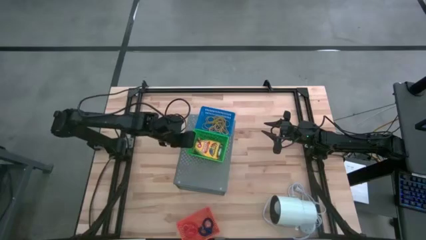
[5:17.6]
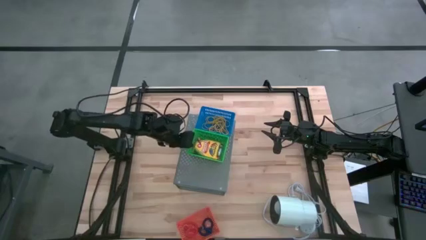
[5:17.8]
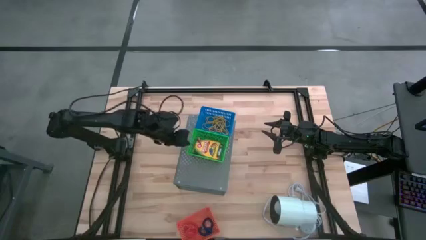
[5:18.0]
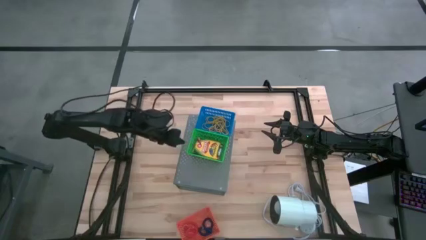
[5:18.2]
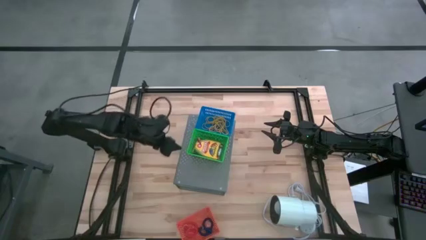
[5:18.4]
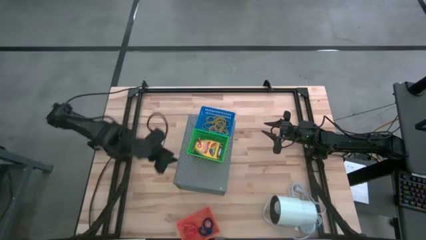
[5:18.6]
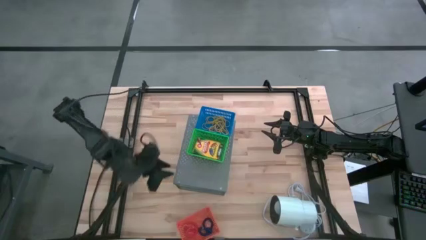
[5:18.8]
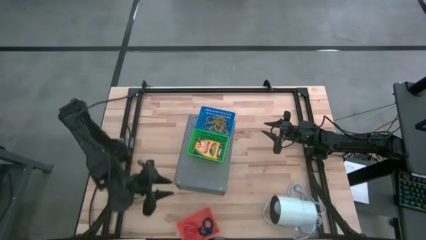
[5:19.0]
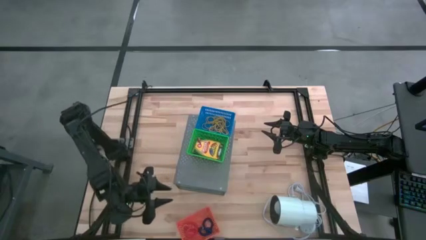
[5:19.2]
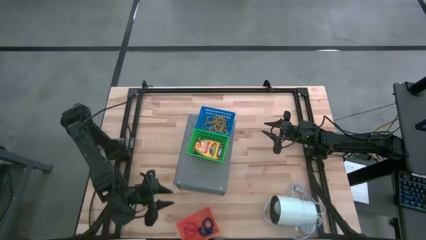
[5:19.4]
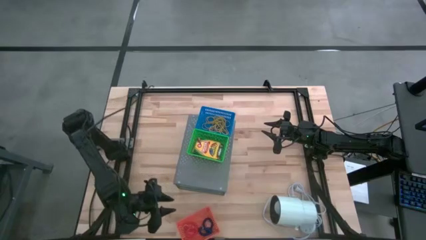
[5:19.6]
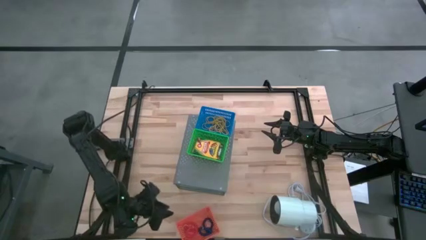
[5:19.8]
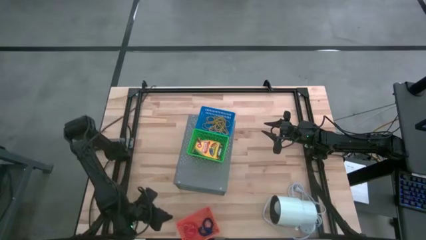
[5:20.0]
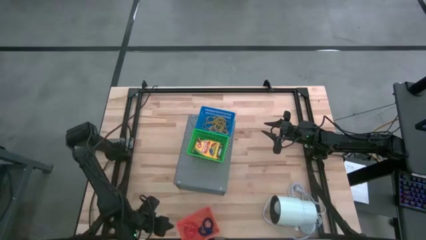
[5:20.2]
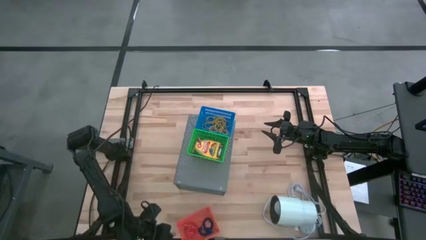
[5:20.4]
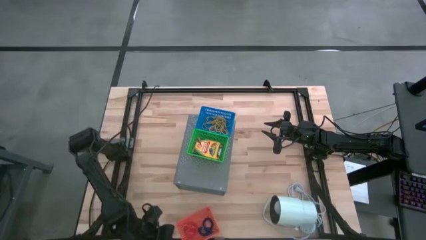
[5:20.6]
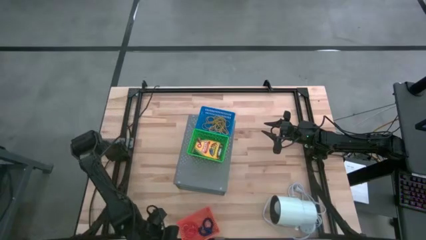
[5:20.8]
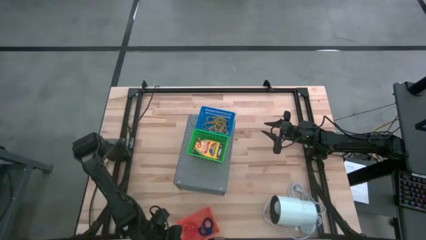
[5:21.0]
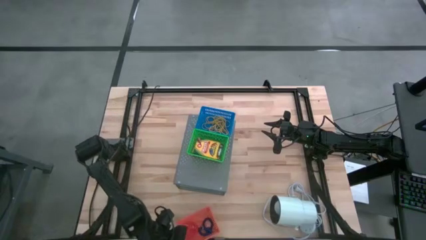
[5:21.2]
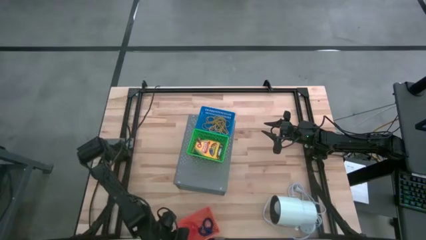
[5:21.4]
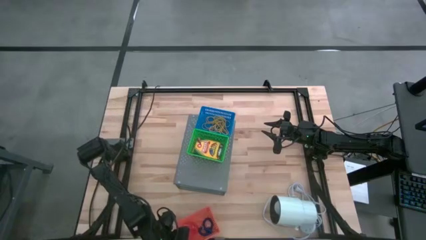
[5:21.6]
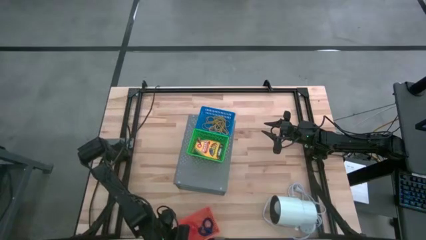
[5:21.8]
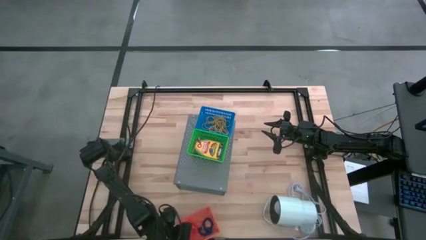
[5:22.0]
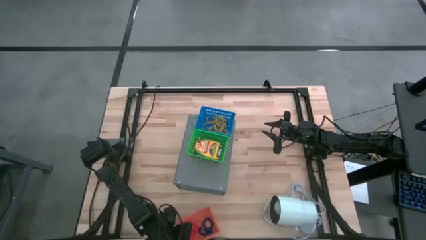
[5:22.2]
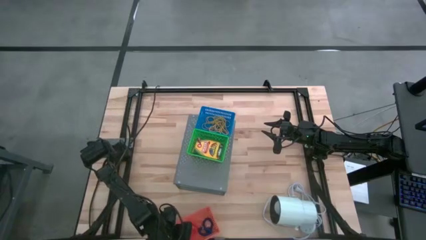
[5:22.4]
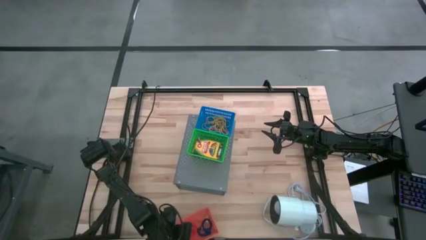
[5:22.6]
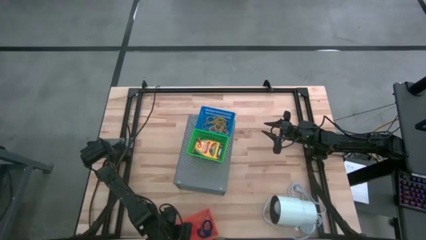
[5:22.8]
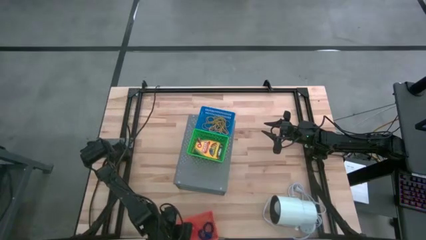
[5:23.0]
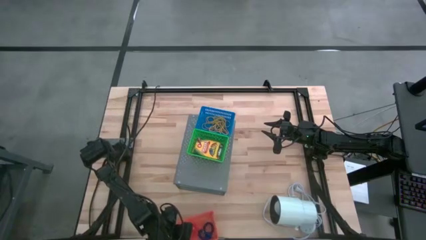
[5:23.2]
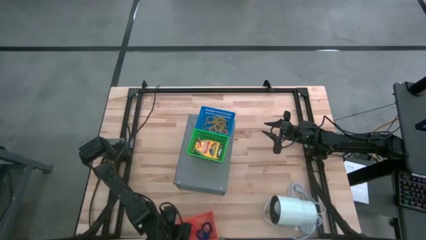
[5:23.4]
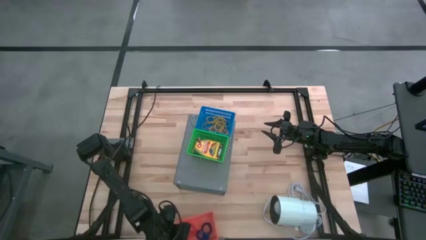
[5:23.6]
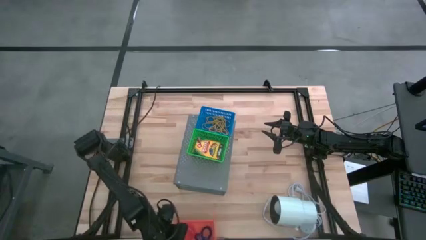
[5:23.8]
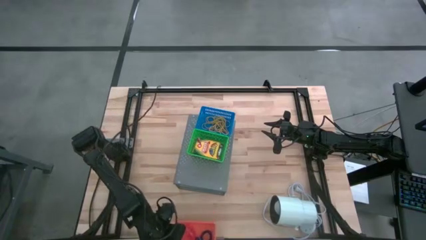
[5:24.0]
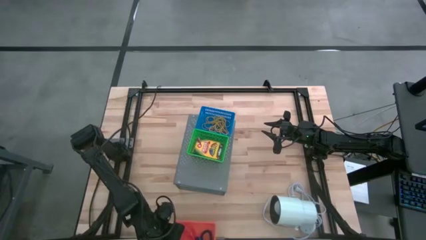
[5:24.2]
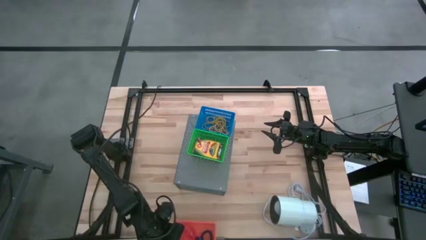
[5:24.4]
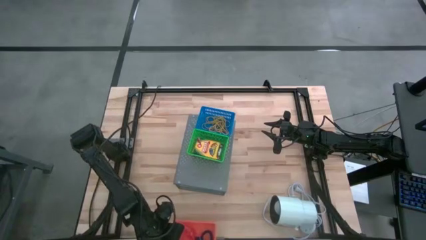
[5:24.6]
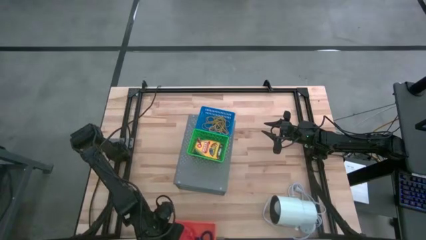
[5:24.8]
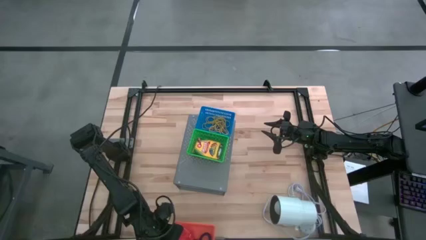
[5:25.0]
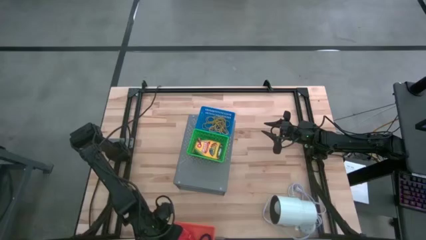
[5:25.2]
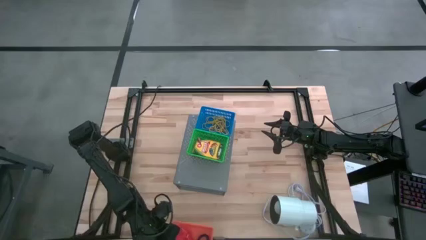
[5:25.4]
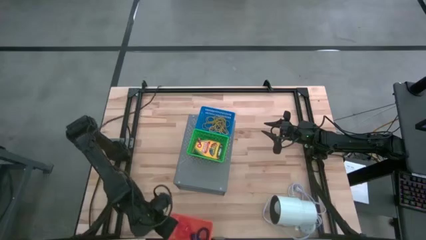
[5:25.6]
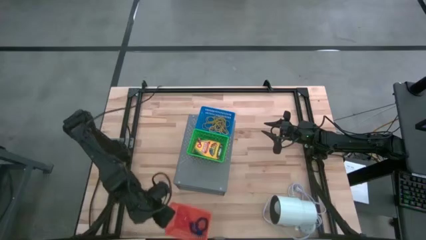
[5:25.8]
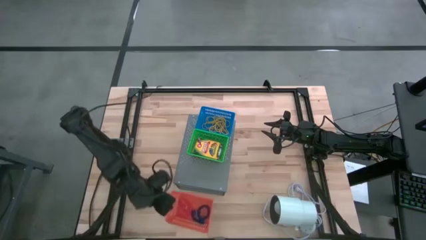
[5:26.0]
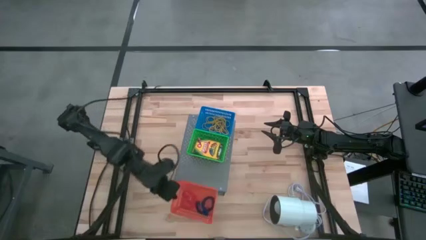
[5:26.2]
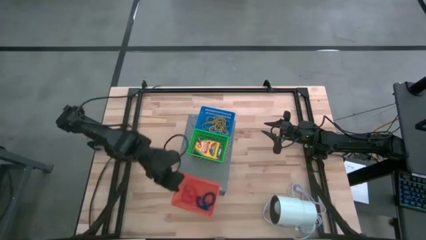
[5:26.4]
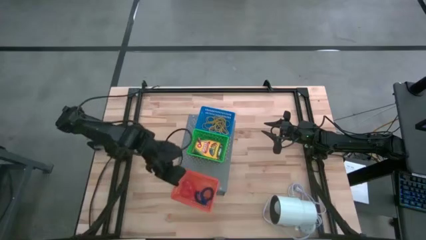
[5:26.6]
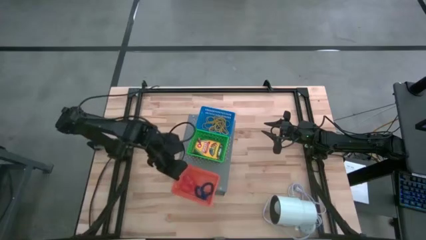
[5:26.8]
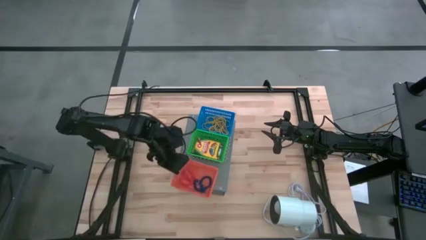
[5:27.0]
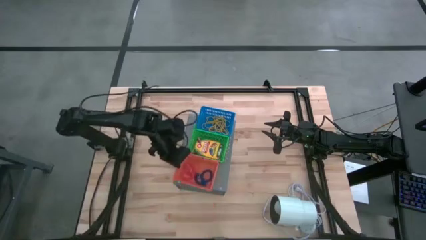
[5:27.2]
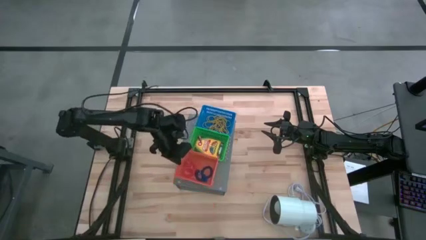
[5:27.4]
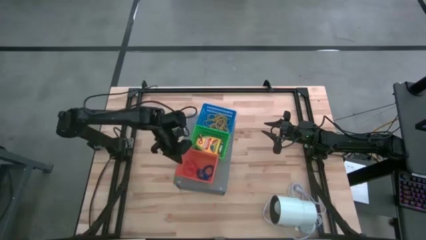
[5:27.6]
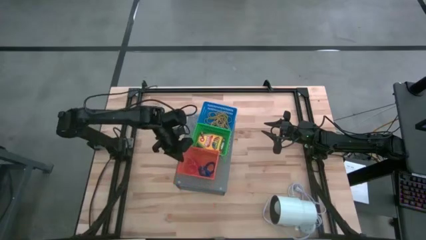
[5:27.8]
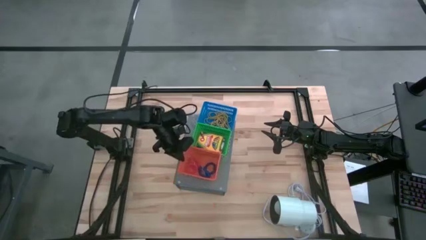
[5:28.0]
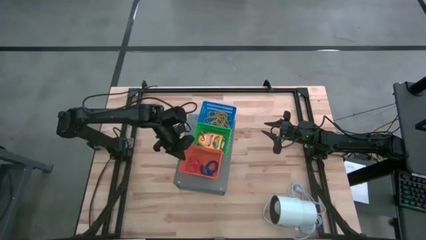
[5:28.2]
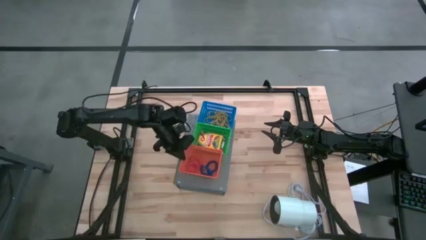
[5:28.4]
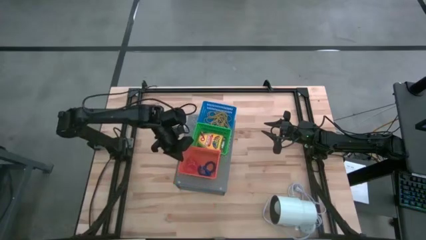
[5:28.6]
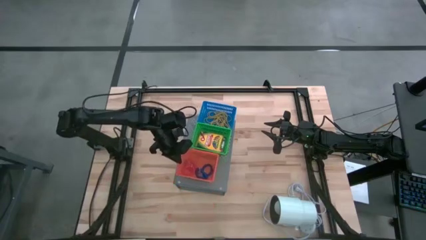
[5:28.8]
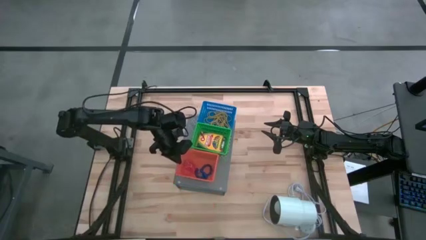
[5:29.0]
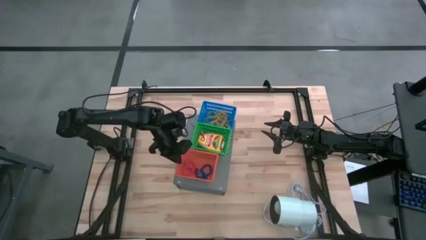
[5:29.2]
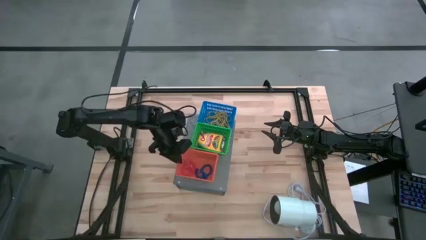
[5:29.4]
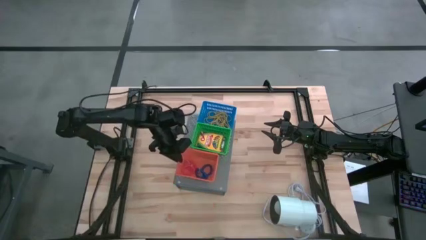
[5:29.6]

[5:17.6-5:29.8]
Task: Pick & Place Office Desk Supplies
Put the orange basket on the shelf

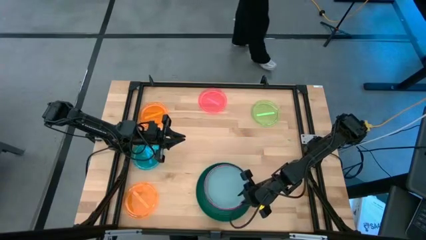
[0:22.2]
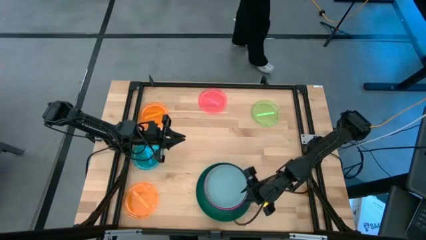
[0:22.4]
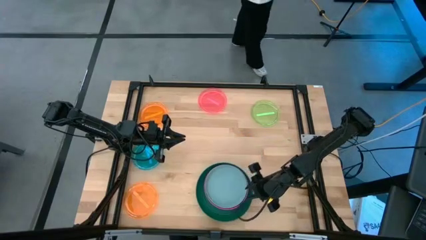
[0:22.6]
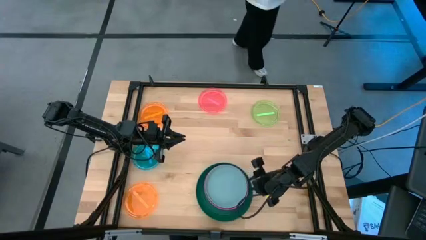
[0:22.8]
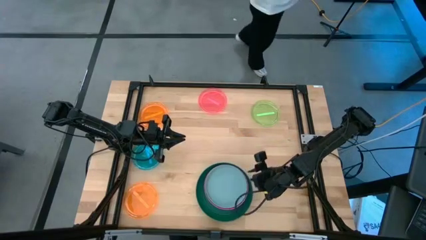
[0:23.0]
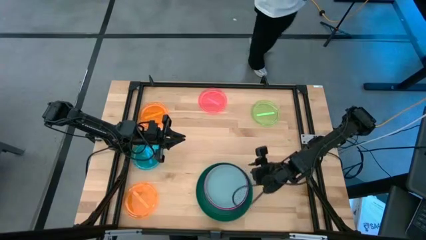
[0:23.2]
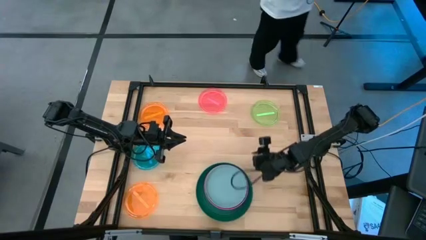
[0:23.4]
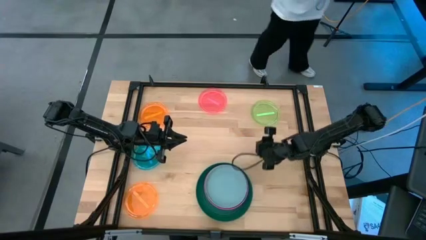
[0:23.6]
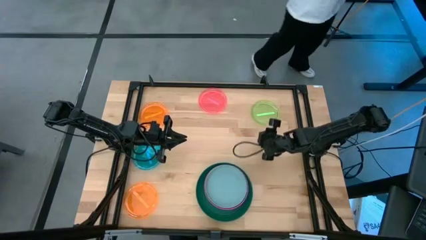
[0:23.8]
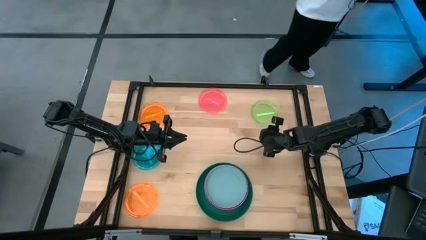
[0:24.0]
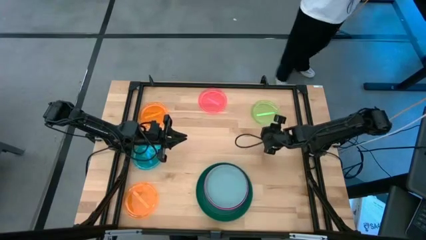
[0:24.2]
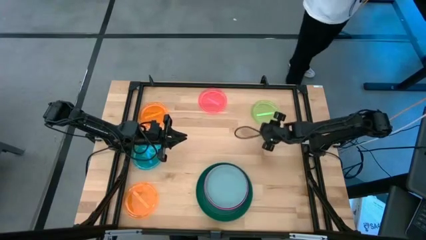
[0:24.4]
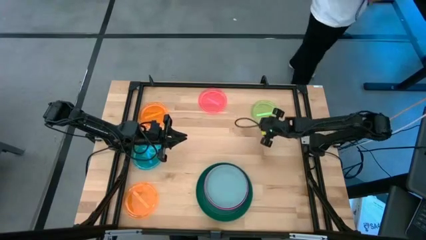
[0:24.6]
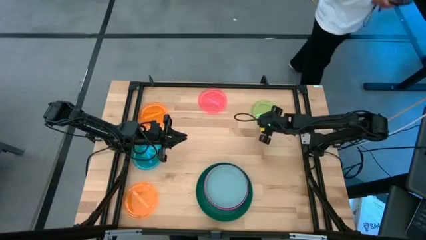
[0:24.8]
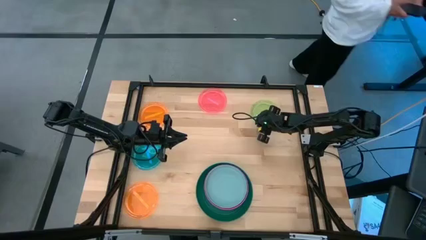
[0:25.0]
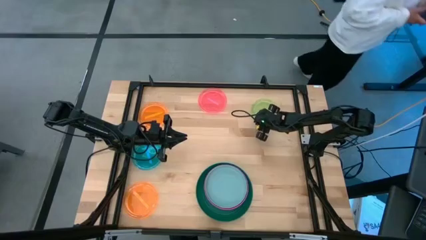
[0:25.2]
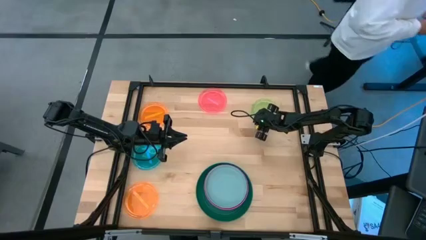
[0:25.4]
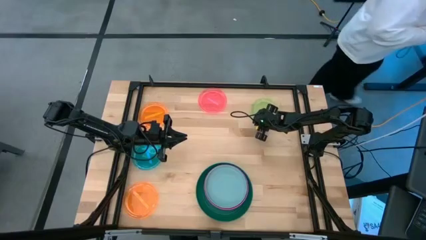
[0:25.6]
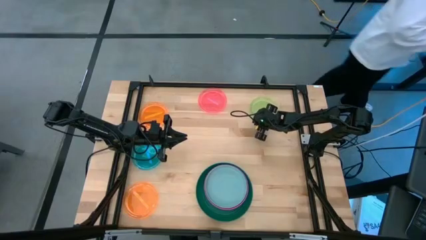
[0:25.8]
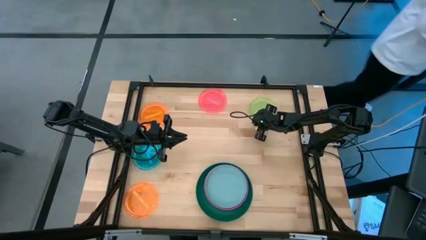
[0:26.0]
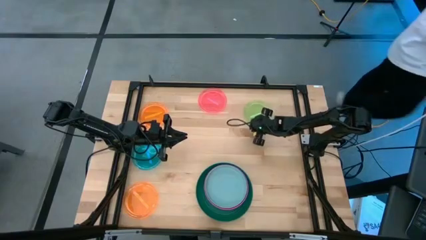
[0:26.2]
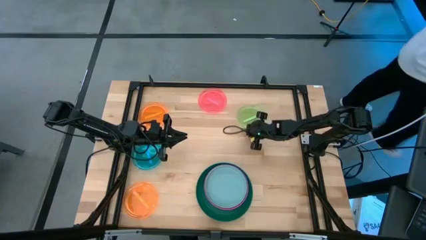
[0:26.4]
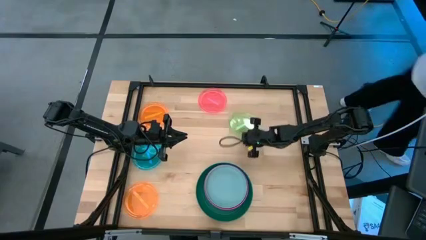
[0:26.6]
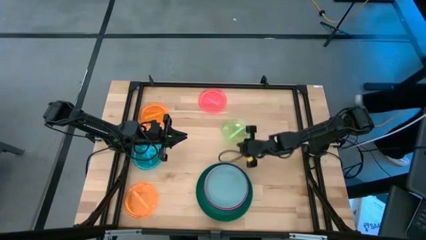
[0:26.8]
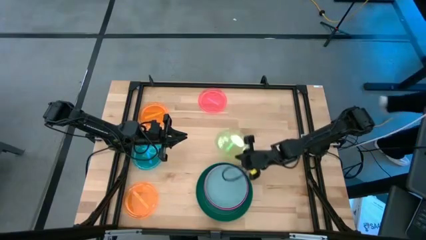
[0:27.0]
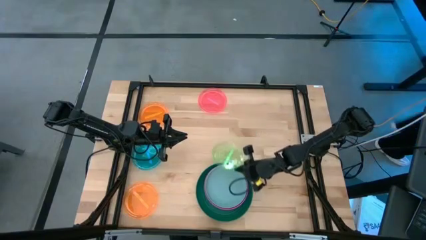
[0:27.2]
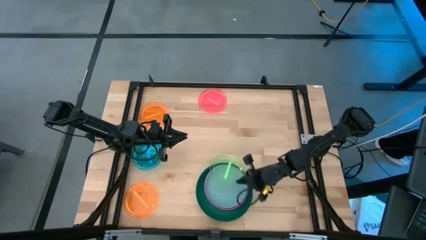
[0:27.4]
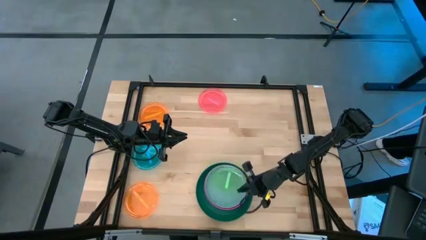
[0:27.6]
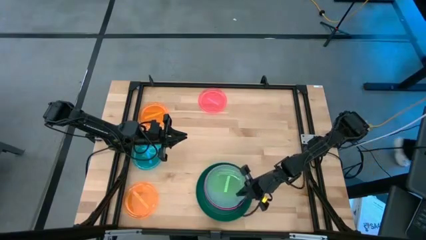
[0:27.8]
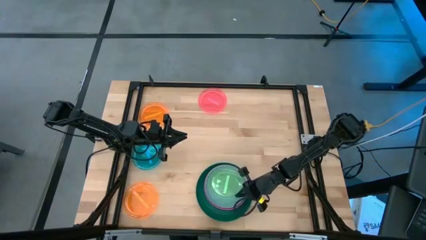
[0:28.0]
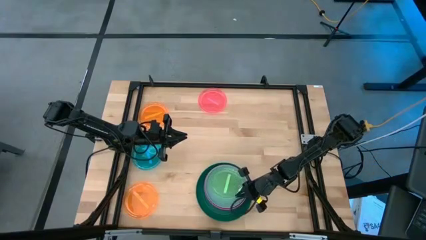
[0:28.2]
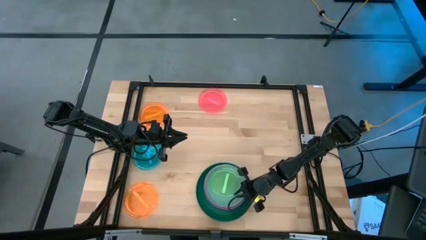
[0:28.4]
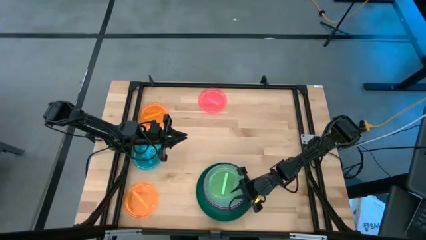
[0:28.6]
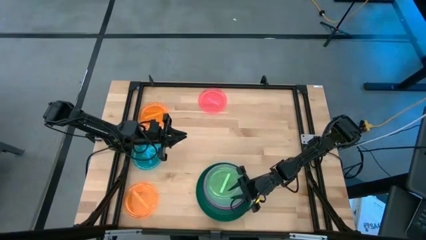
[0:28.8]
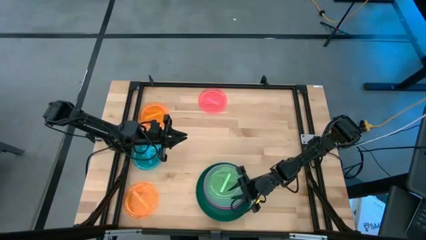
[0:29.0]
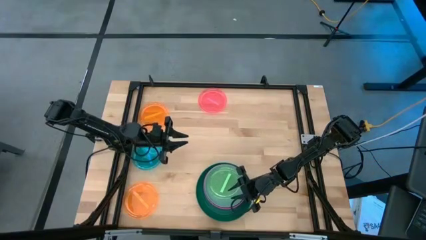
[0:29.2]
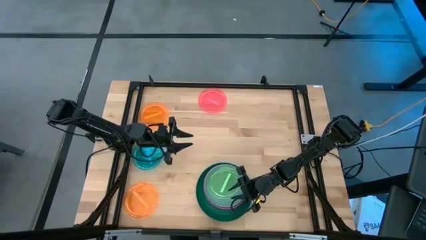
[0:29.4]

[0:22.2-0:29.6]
Task: Stack plastic plates
Stack the green transparent plate on top of the light blue plate
